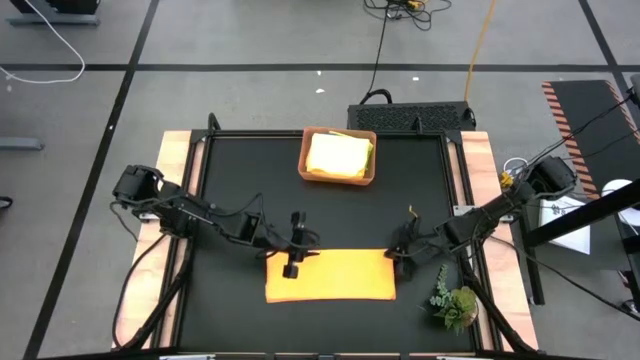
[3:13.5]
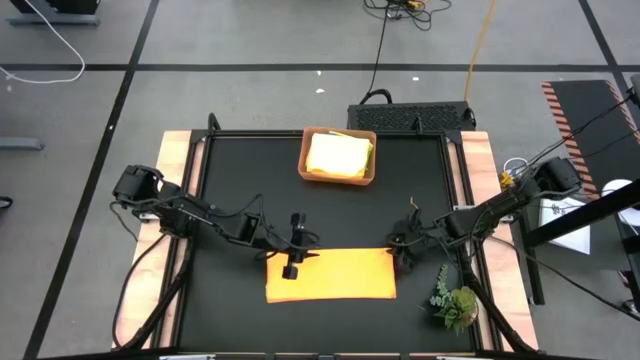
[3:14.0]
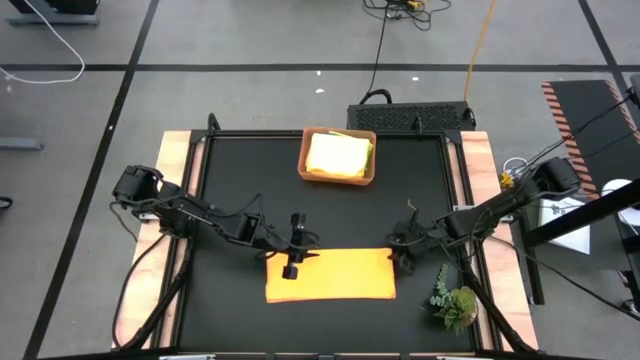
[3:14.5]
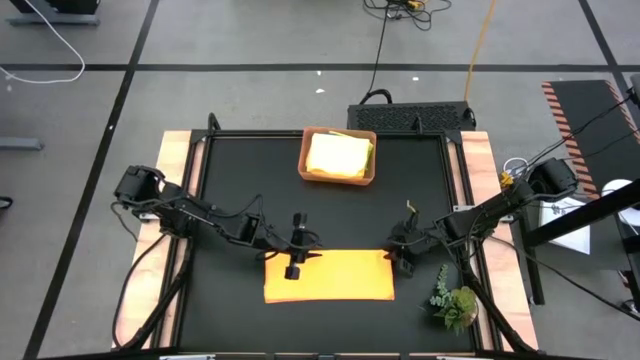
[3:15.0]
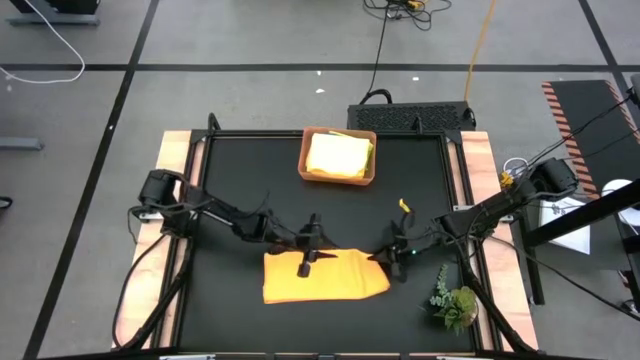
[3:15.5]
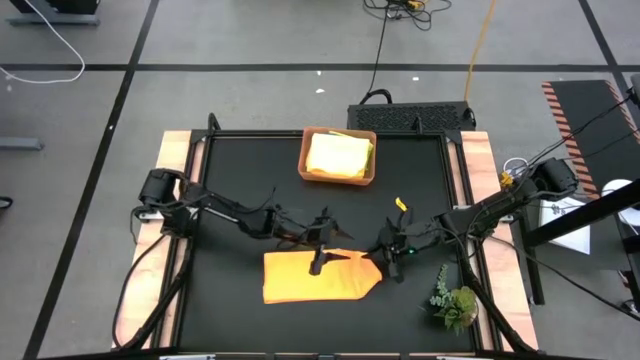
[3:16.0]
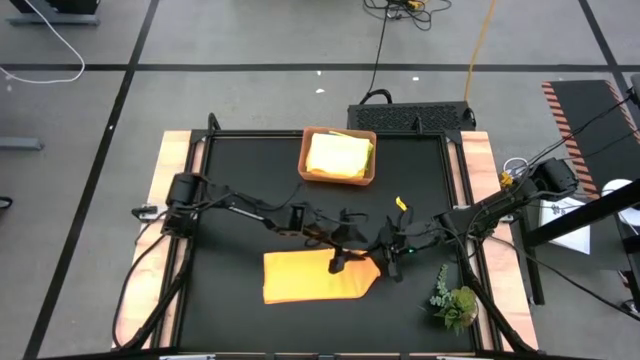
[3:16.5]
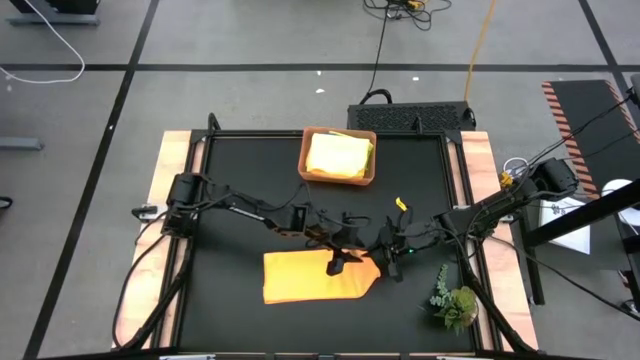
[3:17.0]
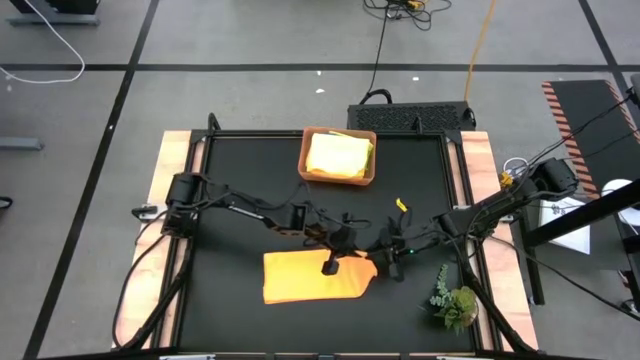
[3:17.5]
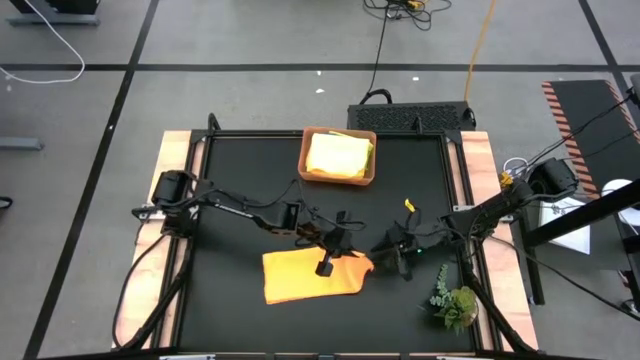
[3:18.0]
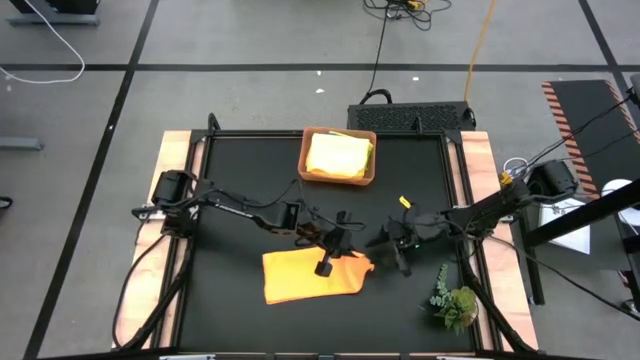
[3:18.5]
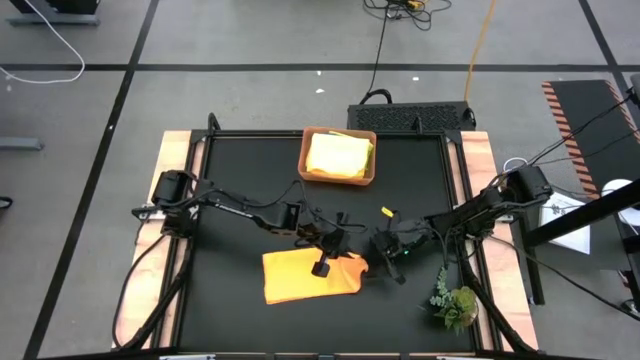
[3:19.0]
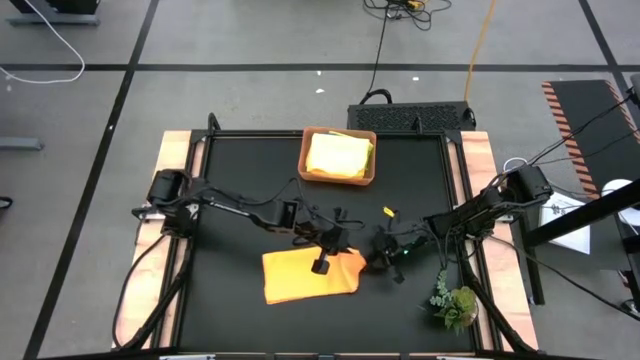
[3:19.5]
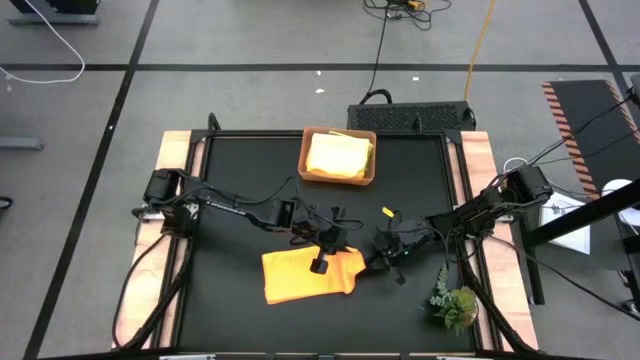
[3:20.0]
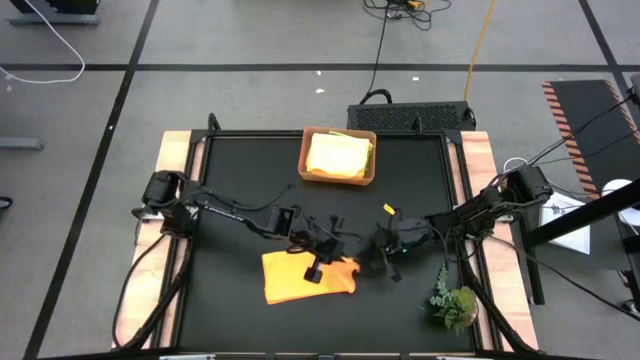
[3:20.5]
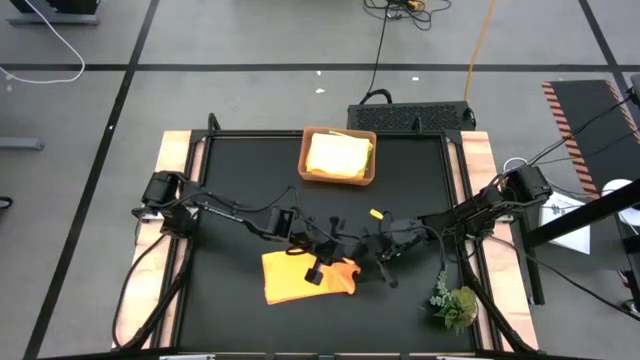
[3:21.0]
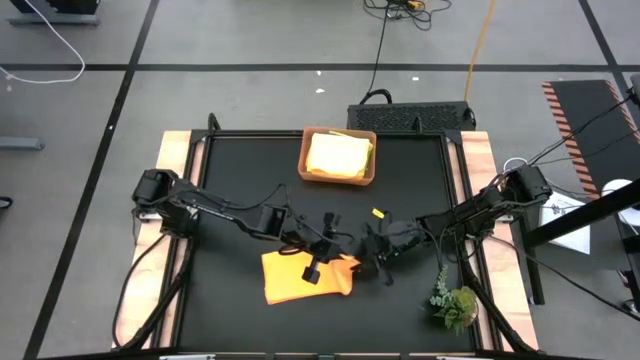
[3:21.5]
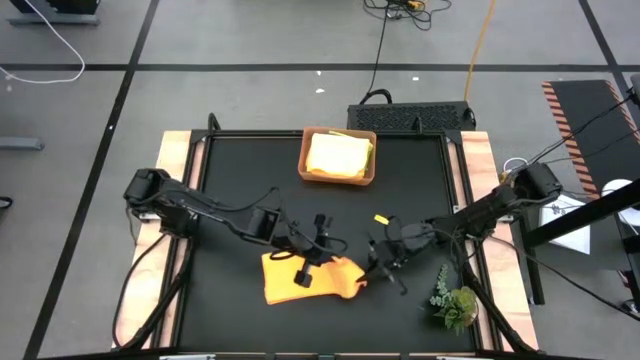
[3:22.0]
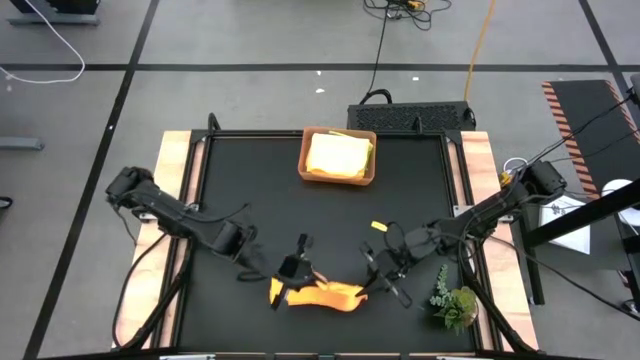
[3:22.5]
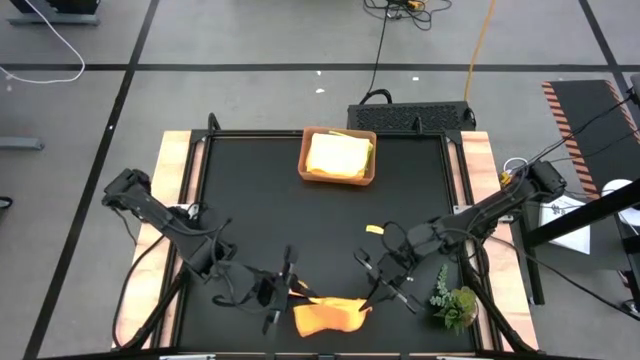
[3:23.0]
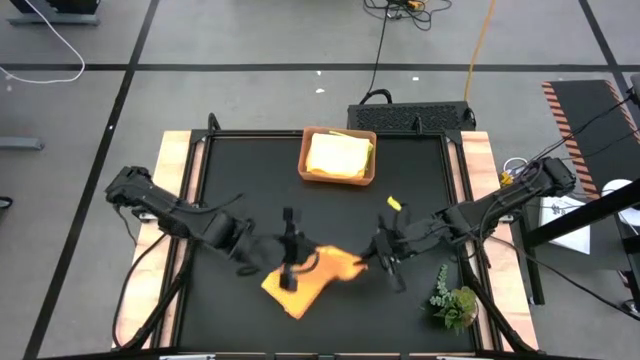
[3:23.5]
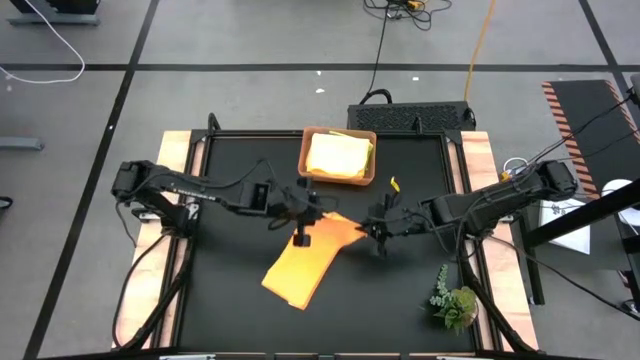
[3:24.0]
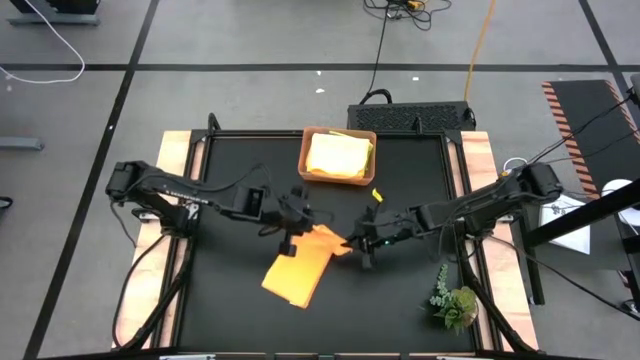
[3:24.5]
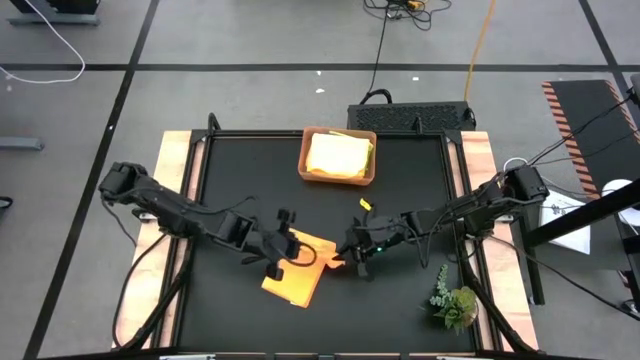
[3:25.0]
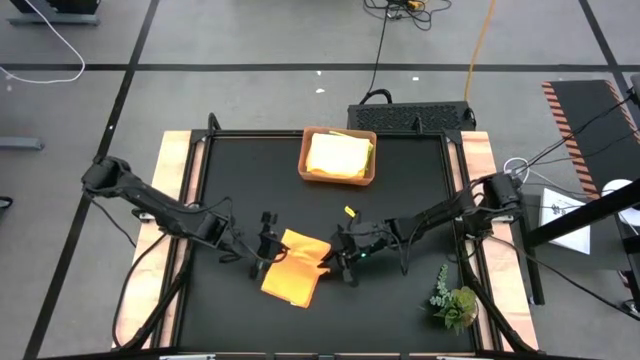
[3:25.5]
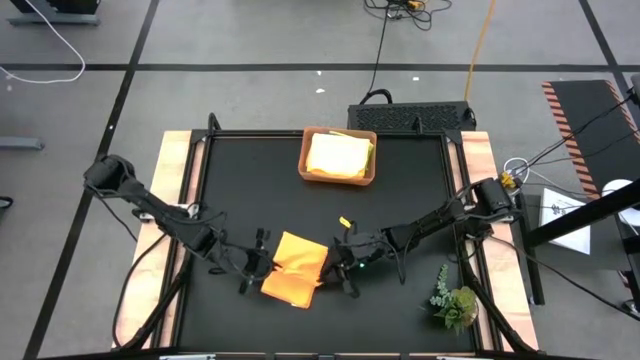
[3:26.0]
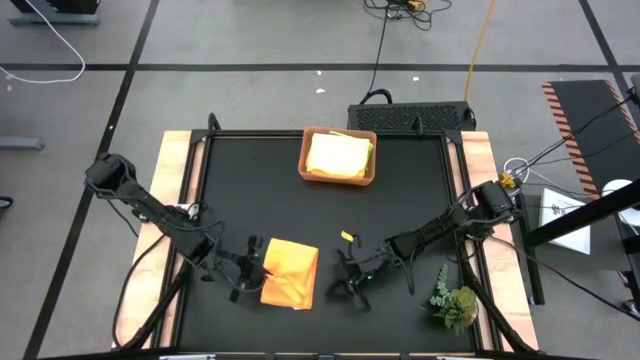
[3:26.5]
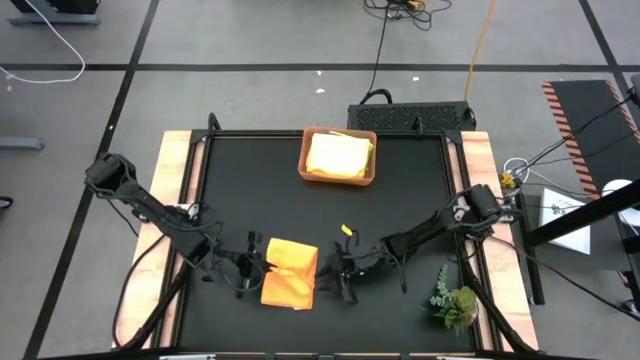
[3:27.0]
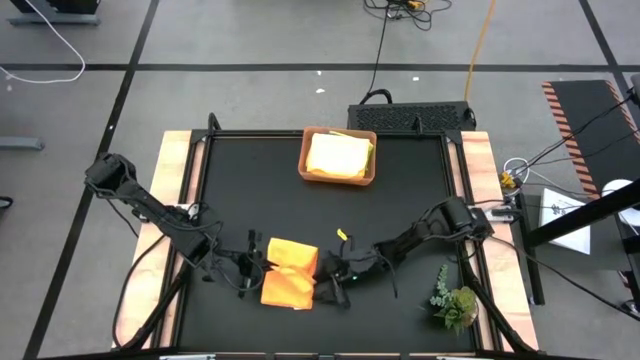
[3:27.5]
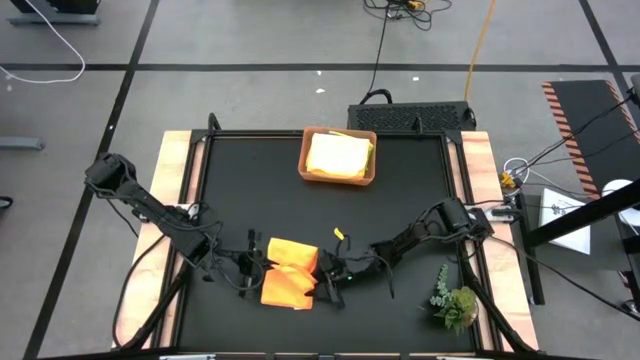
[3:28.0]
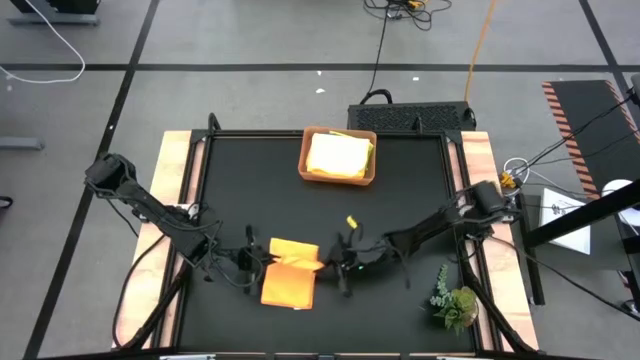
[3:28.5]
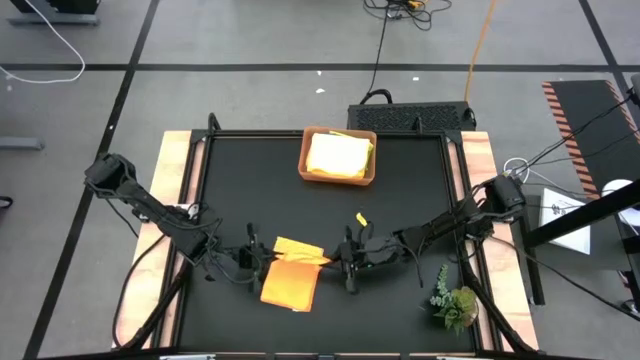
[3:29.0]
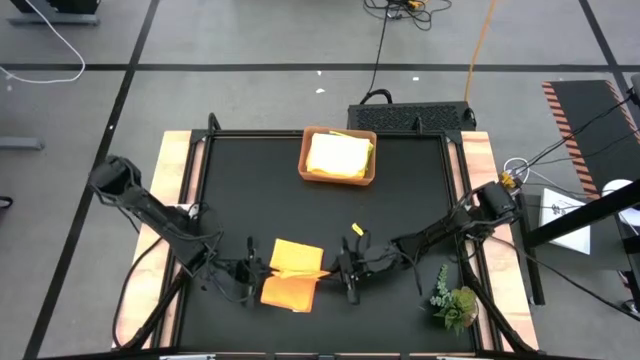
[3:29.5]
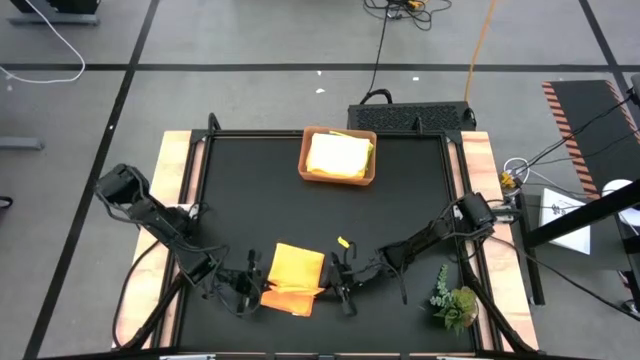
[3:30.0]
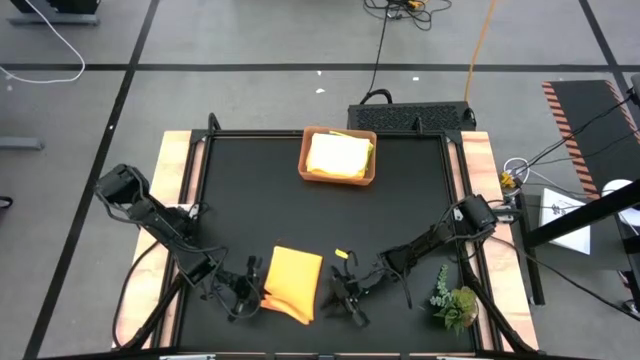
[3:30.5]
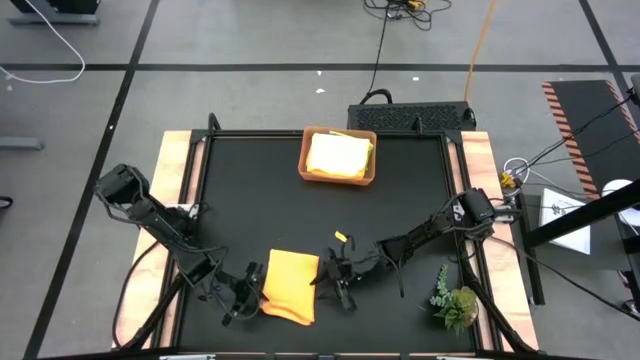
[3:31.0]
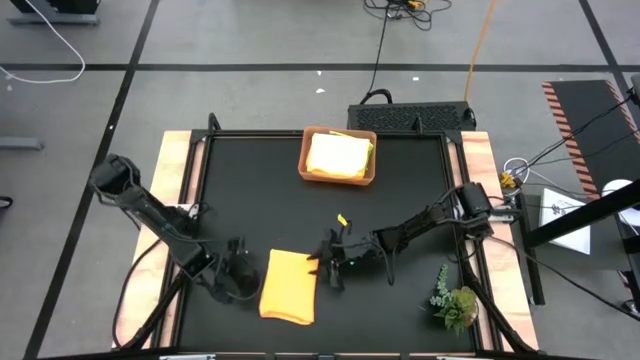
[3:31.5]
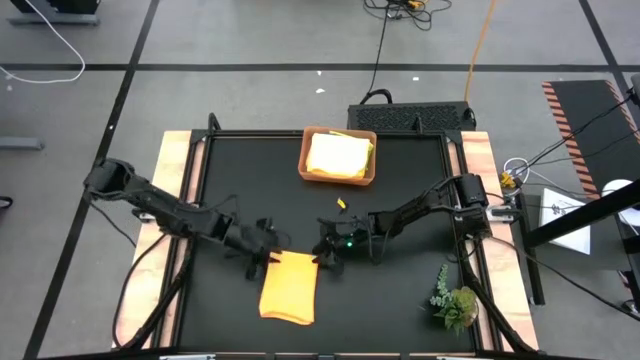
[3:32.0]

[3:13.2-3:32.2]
Task: Fold microfiber towels
Fold the orange microfiber towel

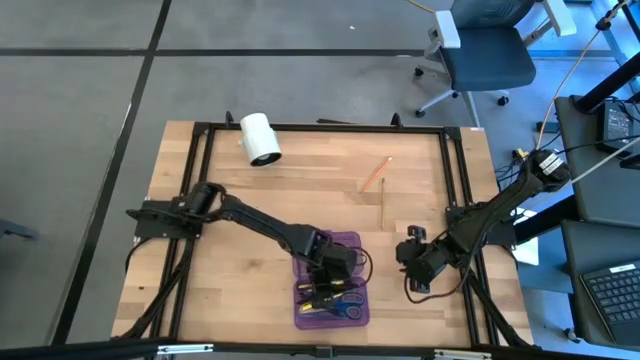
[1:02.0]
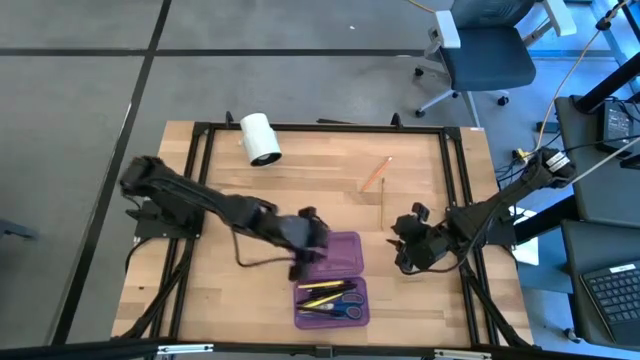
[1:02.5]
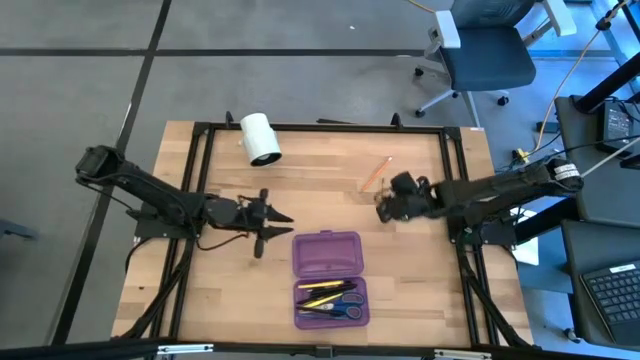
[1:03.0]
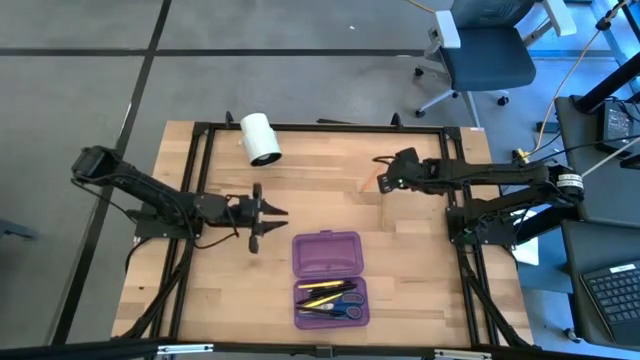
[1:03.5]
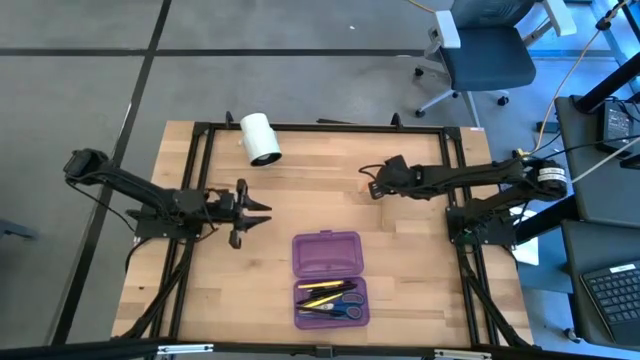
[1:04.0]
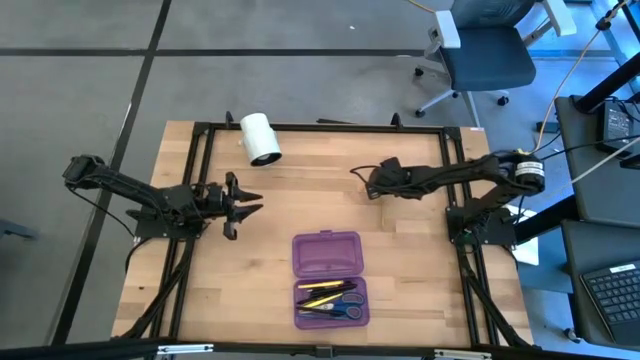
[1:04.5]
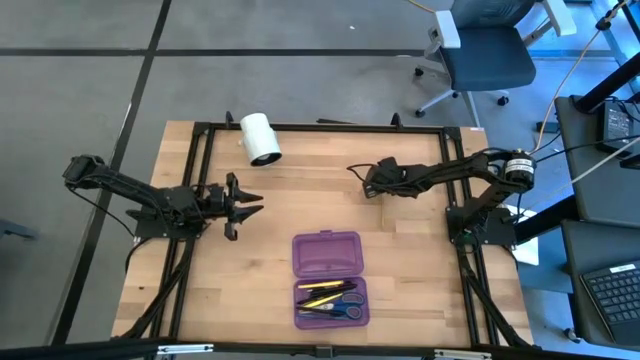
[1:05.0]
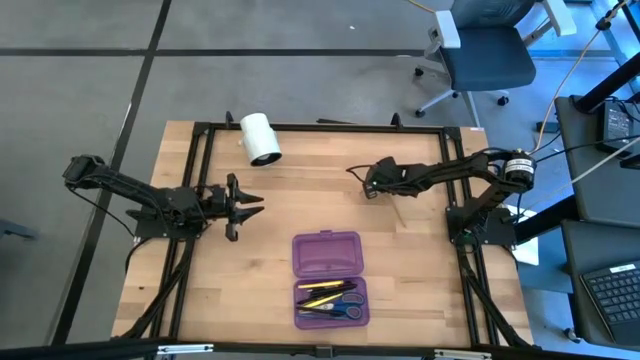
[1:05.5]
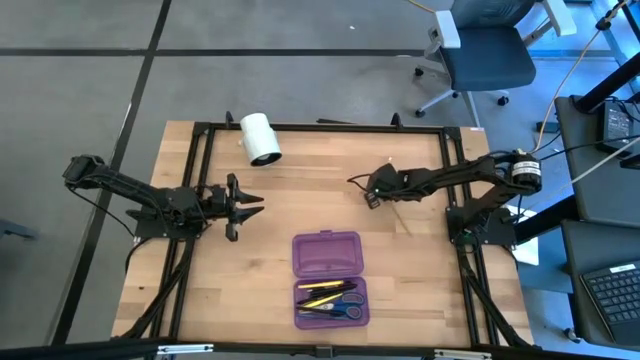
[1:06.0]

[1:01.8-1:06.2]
Task: Pick & place school supplies into a supply box
Put the yellow pencil into the purple supply box
